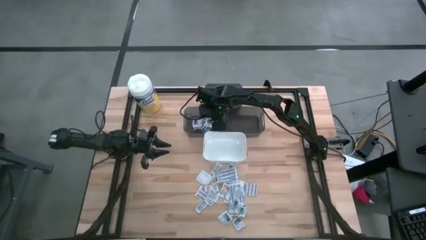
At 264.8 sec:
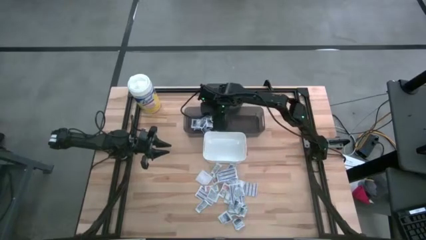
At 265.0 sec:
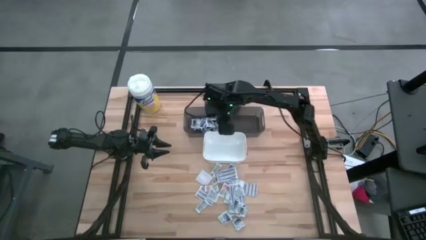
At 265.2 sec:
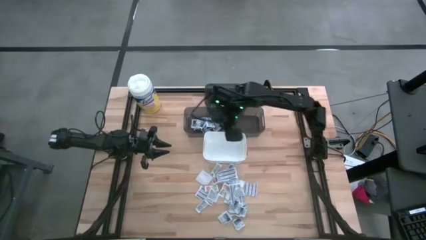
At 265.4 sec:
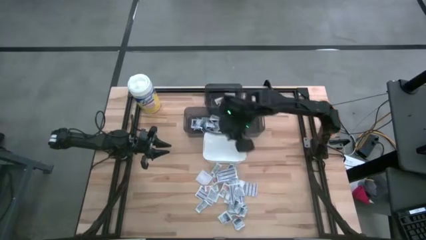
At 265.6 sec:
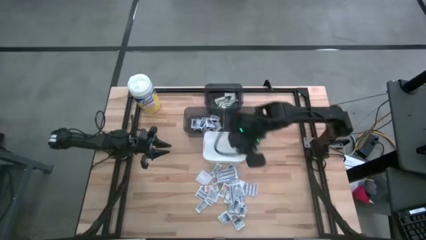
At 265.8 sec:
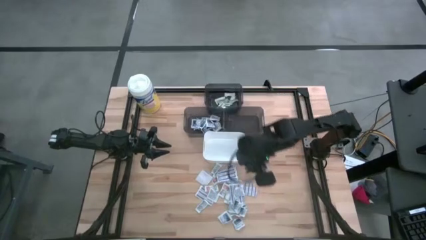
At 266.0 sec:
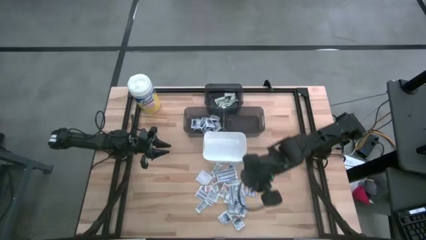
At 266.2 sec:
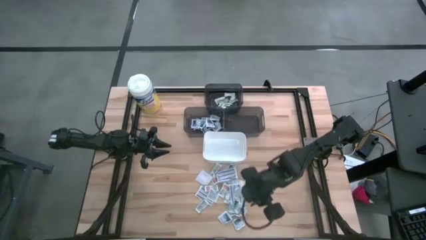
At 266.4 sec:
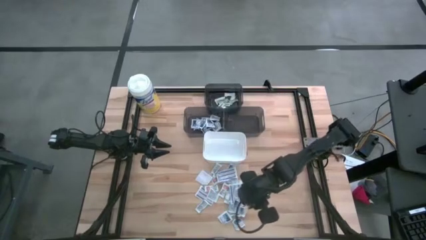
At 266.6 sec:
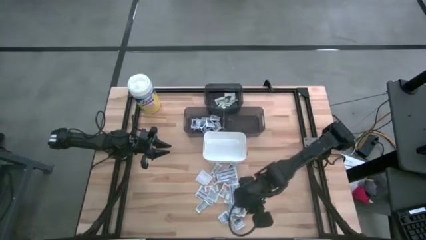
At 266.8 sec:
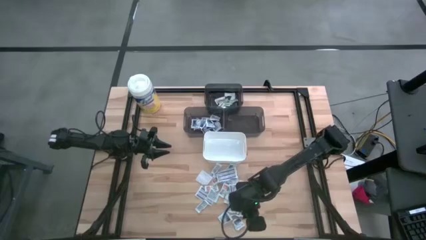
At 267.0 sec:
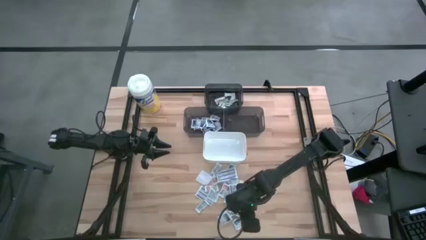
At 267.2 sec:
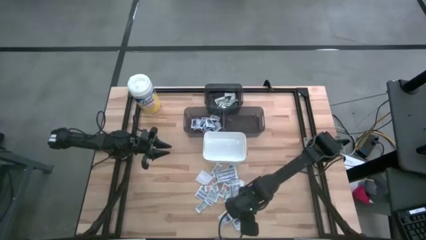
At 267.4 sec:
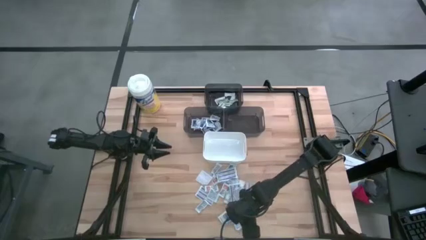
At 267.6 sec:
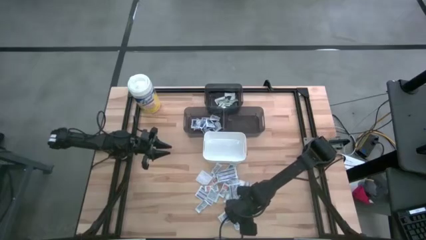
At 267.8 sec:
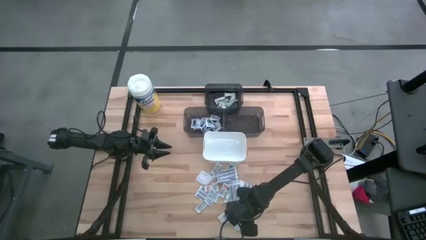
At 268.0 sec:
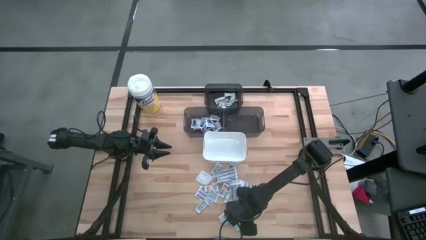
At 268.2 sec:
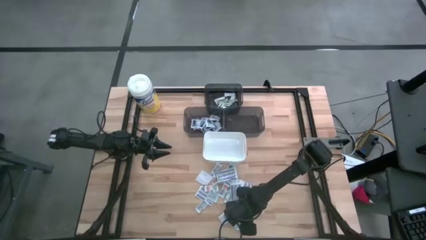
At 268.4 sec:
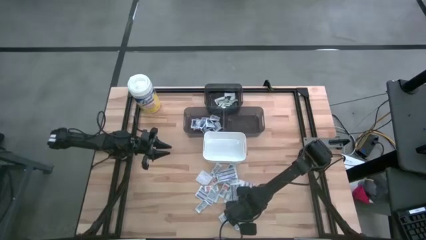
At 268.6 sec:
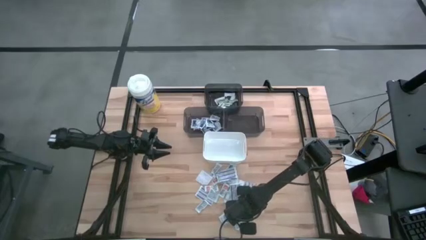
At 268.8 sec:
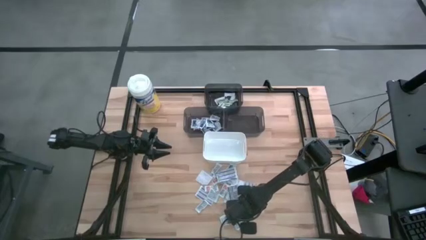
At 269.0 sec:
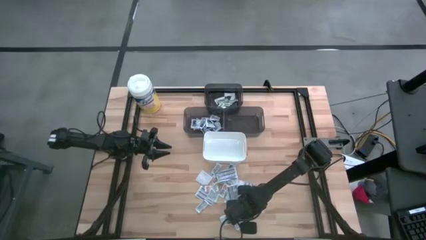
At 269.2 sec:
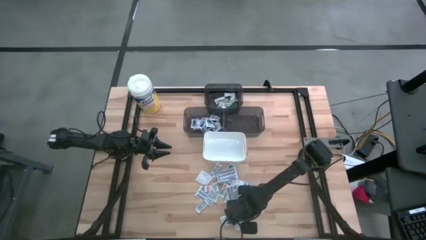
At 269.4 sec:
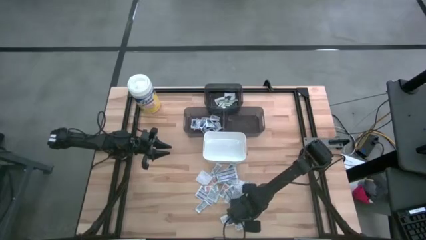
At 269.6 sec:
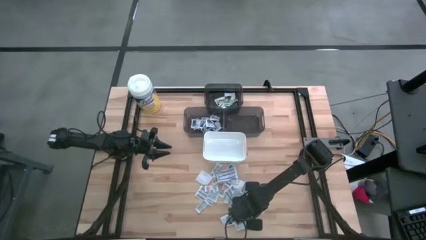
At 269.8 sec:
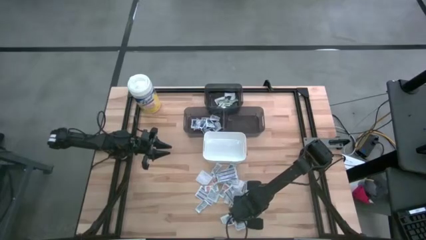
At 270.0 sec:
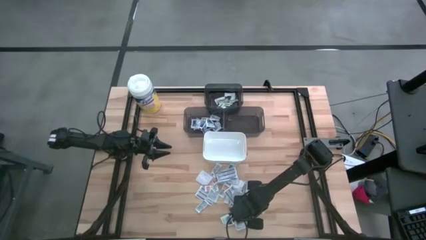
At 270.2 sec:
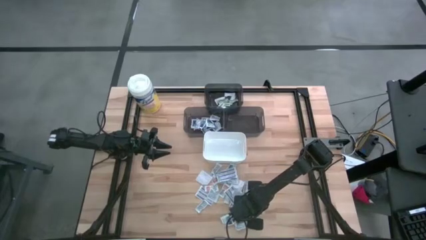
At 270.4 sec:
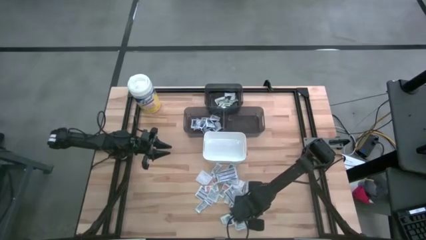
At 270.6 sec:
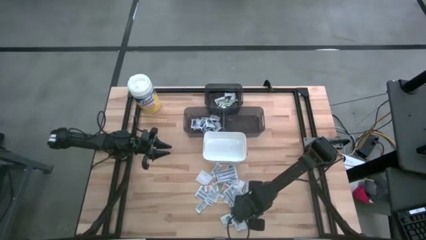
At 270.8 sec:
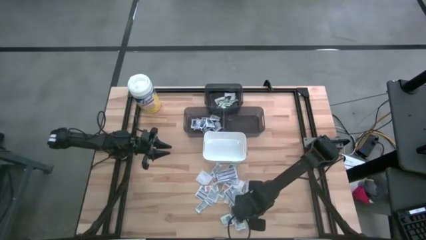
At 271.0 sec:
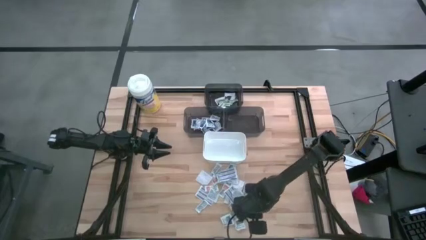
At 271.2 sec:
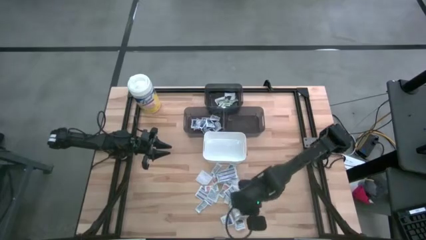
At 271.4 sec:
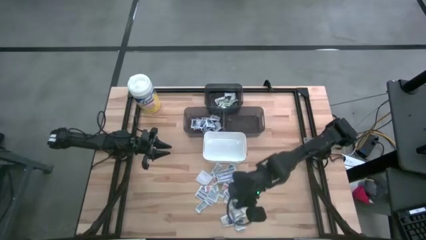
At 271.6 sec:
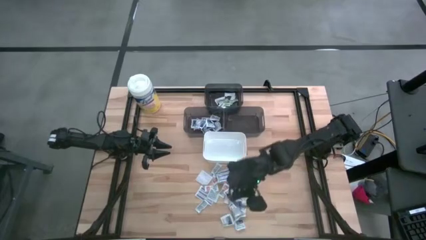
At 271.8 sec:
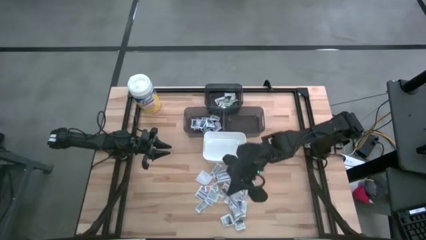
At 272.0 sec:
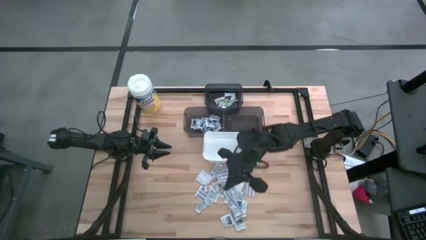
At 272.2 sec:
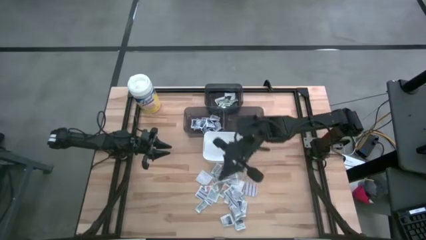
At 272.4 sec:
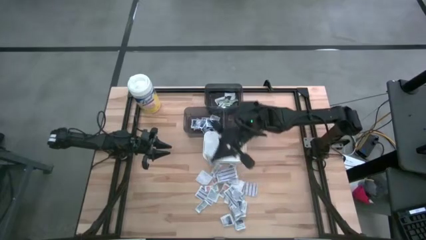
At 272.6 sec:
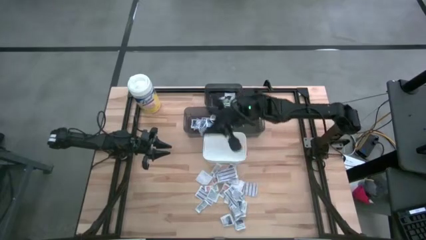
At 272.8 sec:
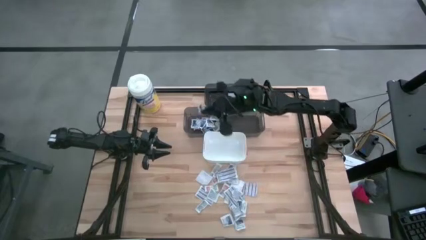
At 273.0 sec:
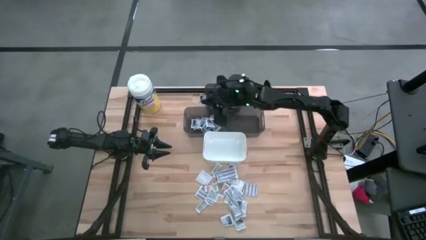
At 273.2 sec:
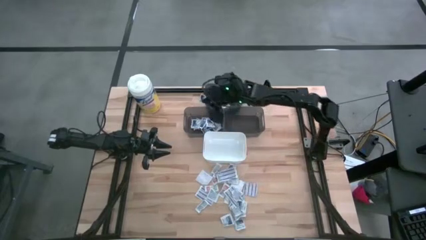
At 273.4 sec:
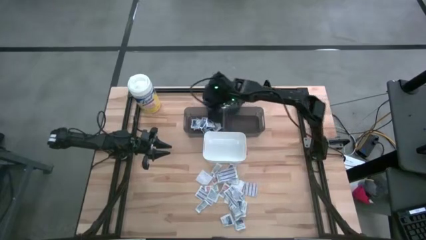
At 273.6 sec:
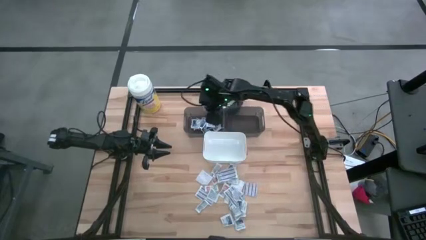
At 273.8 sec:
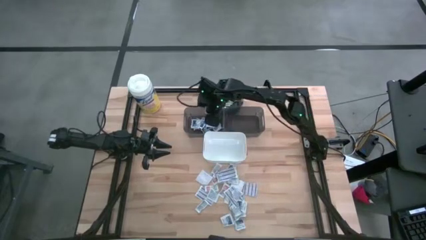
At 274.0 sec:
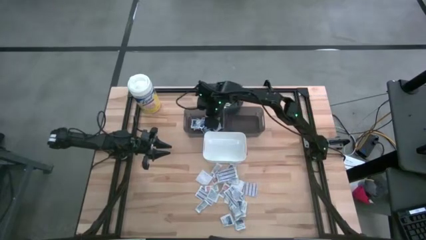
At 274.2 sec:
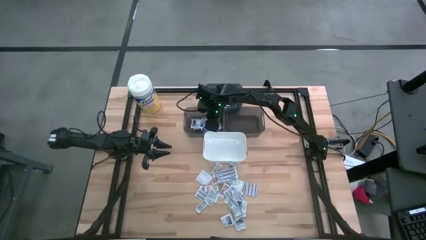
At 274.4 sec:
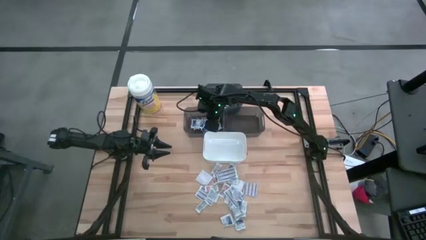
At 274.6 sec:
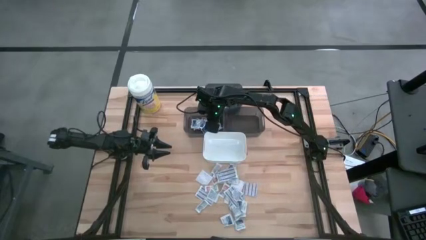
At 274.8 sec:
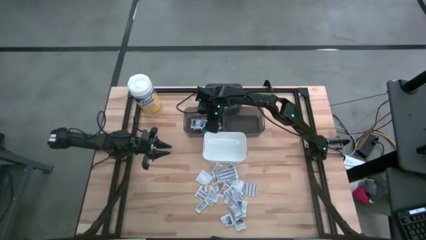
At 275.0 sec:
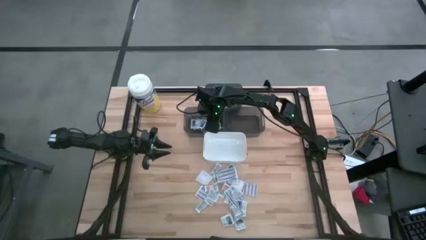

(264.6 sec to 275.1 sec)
Task: Pick & Place First Aid Supplies
Put the alcohol pad into the left black bin

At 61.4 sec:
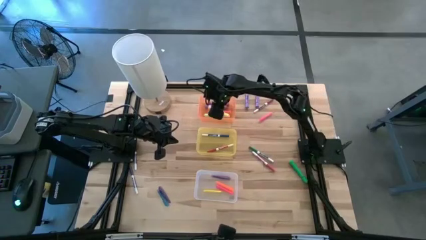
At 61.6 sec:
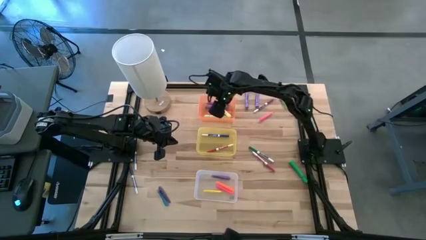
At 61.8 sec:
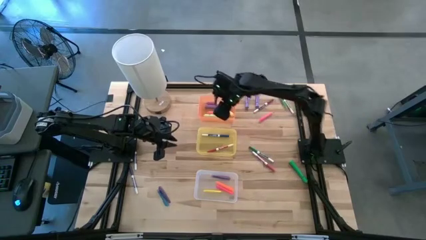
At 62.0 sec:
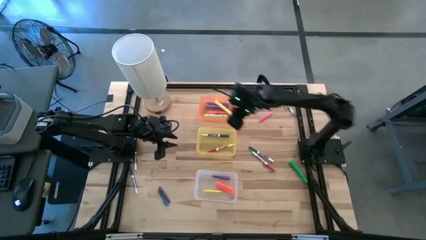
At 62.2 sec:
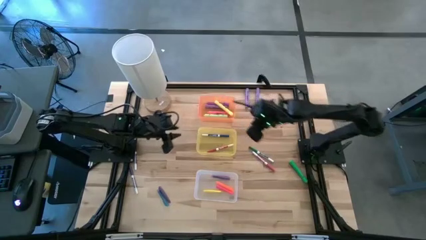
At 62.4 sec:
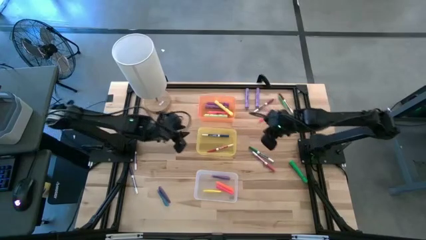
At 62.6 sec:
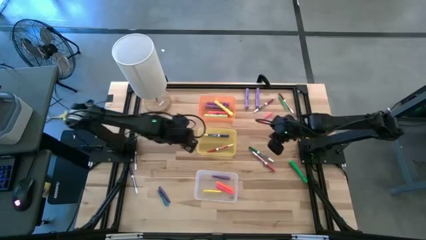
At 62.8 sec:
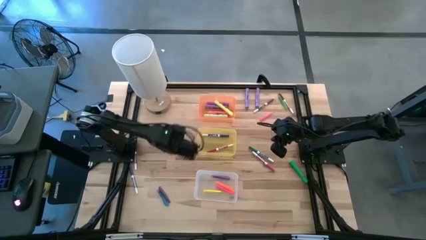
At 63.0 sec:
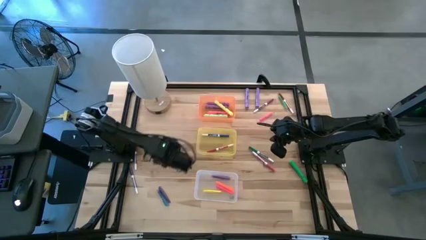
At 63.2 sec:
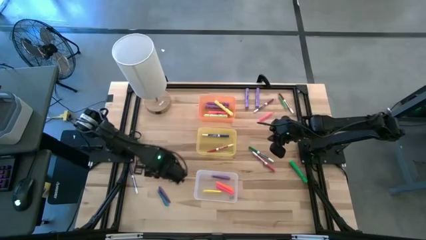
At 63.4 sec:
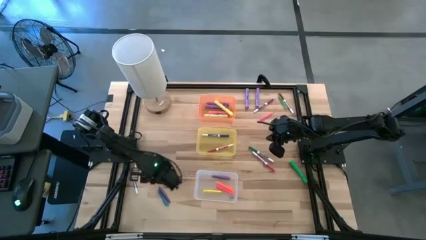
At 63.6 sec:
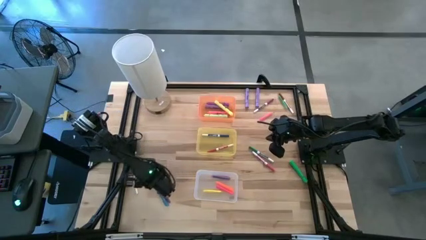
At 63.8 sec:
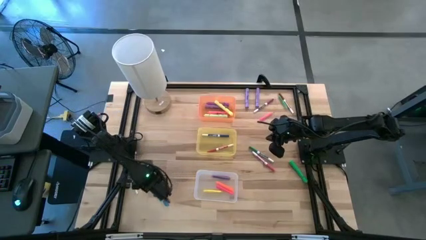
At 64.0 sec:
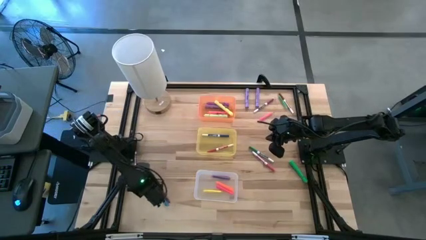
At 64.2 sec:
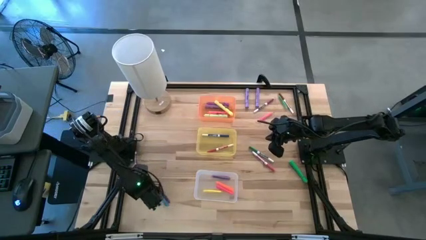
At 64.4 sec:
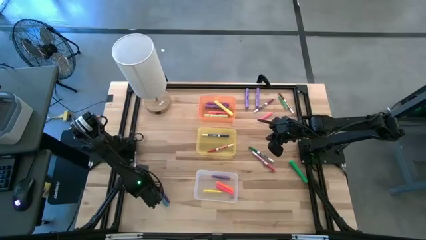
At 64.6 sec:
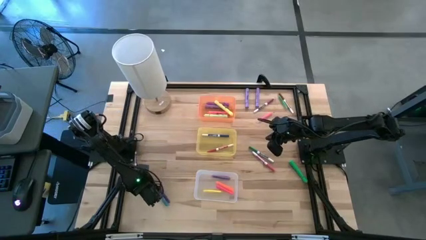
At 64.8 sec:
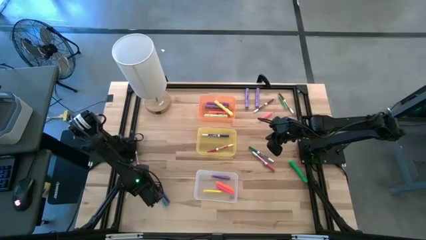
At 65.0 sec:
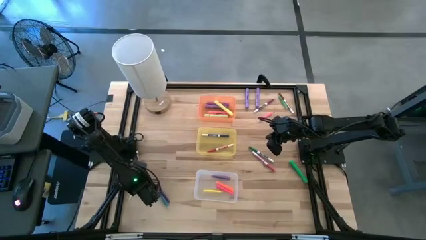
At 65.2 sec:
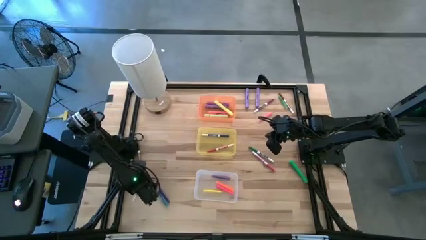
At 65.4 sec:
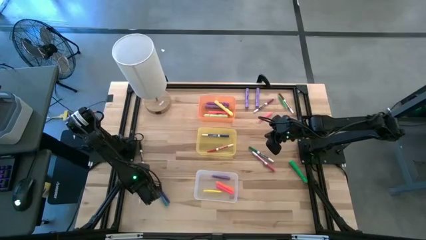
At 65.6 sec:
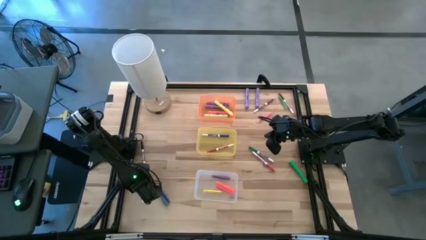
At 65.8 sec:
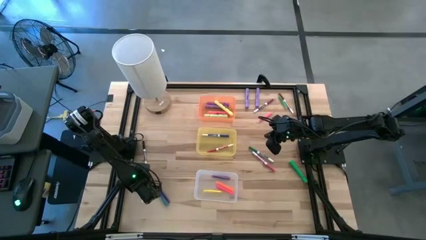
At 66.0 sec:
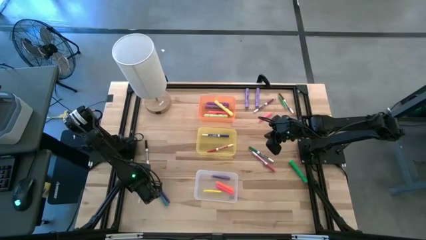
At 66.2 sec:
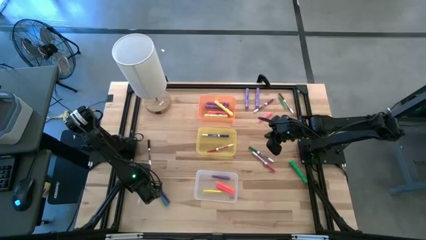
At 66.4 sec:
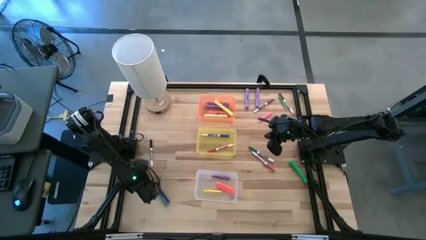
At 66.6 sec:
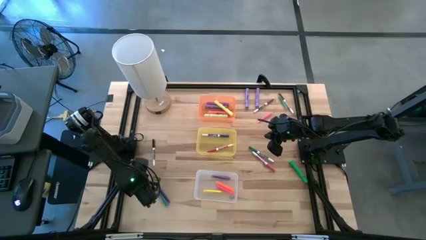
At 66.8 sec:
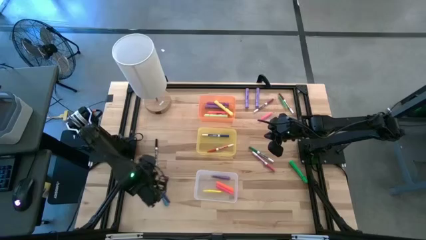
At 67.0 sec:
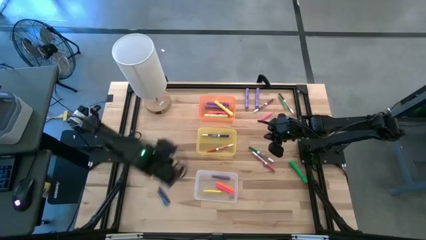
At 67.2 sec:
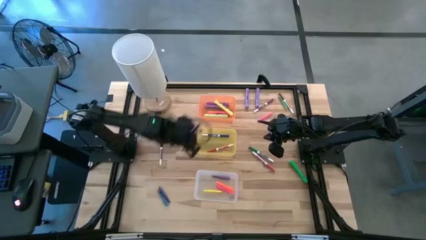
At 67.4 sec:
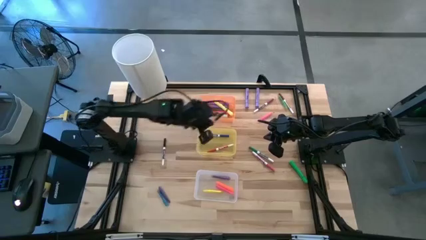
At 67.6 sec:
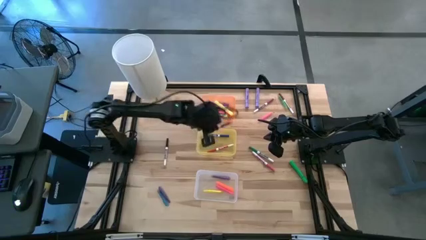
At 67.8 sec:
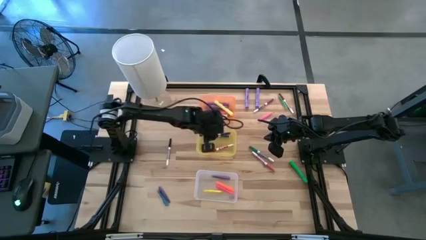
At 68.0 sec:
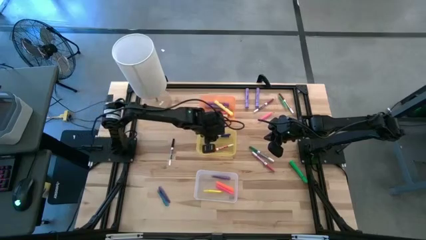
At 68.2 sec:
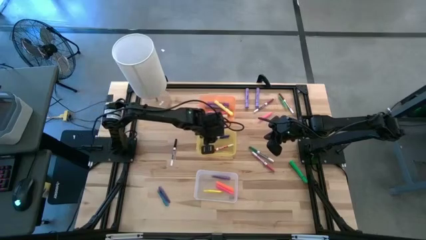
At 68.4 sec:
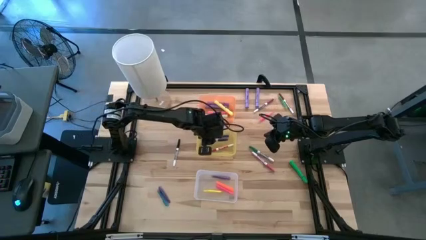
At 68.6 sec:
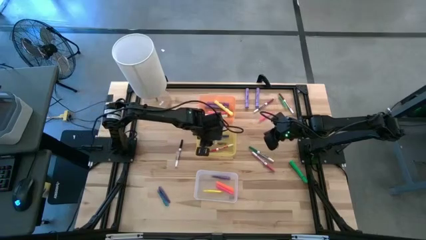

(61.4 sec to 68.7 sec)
Task: Pick & Place Markers
Put the dark blue marker pen into the yellow bin
